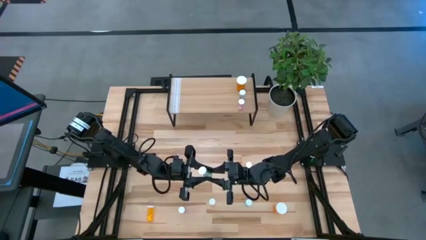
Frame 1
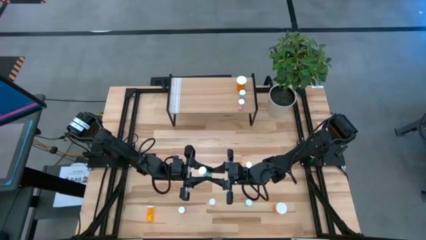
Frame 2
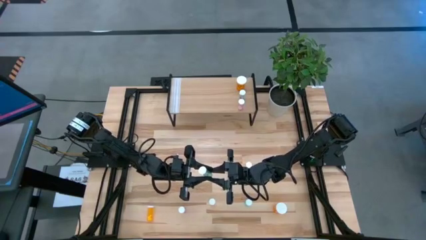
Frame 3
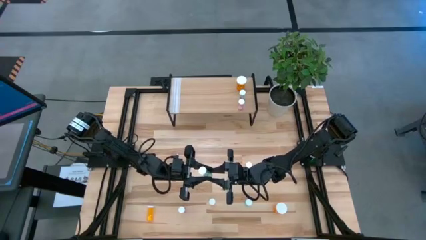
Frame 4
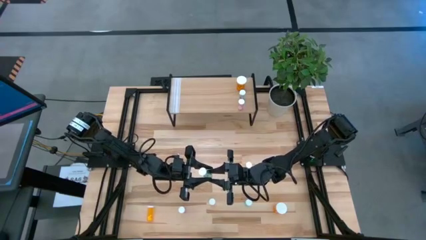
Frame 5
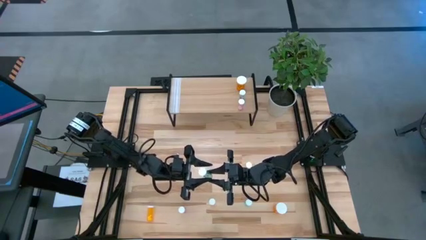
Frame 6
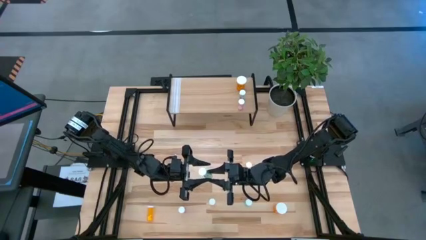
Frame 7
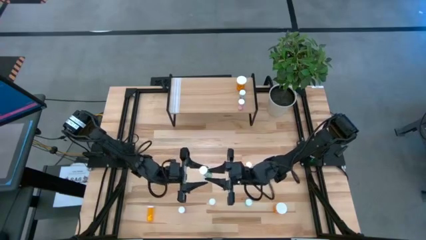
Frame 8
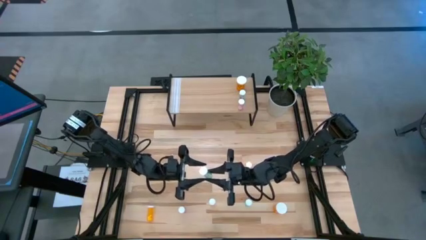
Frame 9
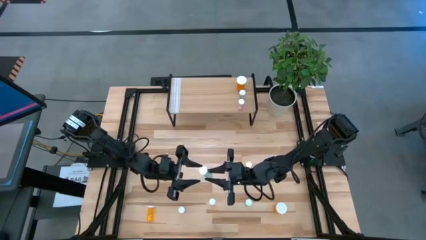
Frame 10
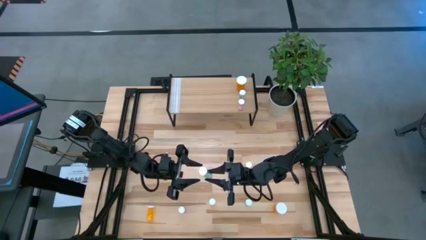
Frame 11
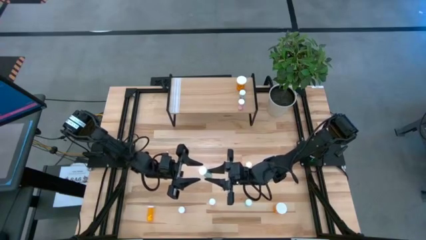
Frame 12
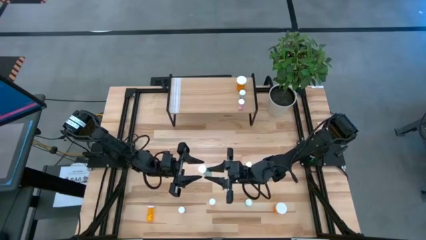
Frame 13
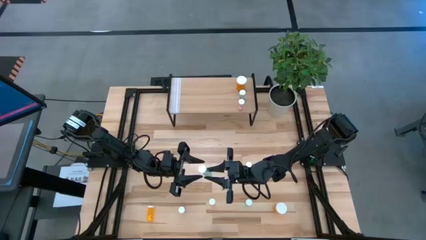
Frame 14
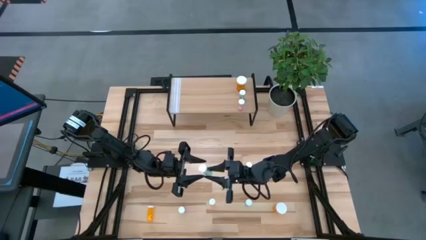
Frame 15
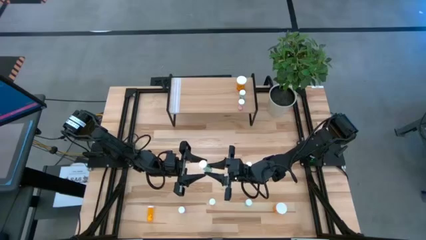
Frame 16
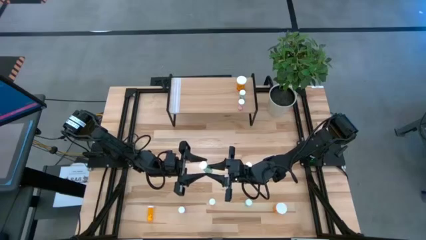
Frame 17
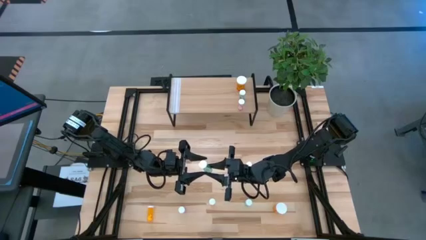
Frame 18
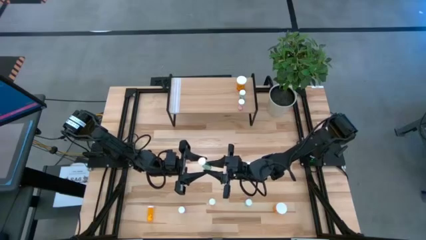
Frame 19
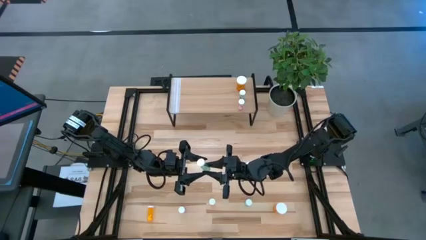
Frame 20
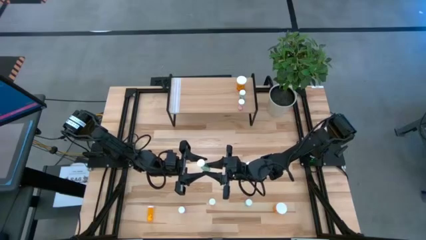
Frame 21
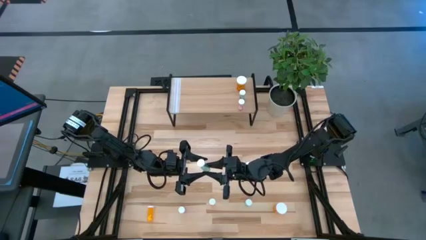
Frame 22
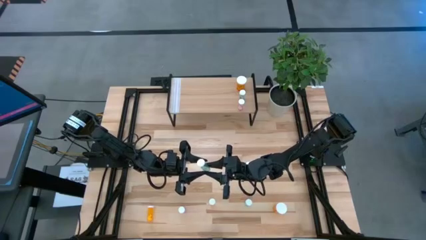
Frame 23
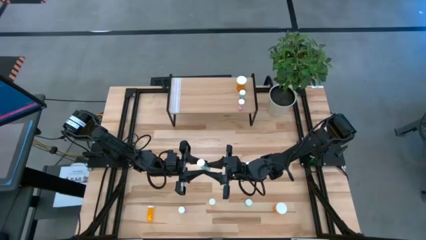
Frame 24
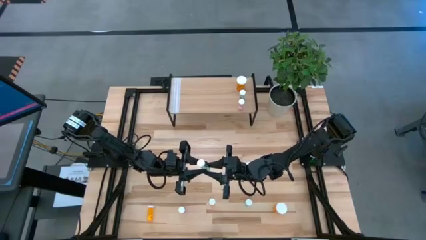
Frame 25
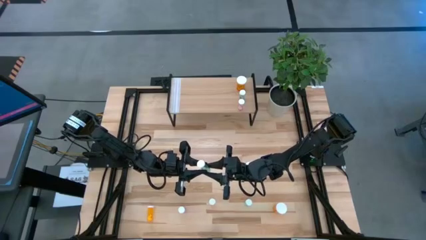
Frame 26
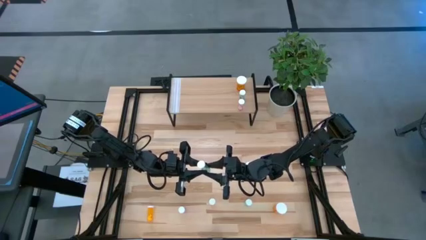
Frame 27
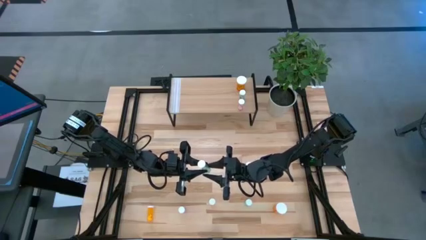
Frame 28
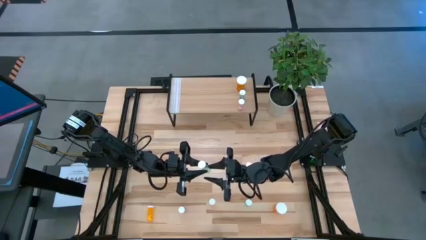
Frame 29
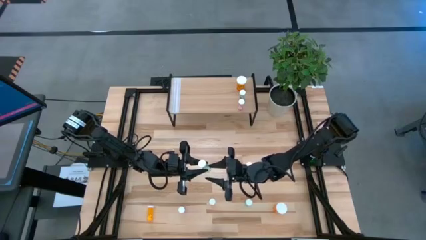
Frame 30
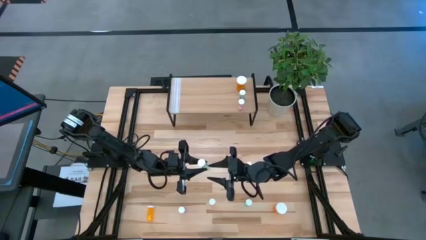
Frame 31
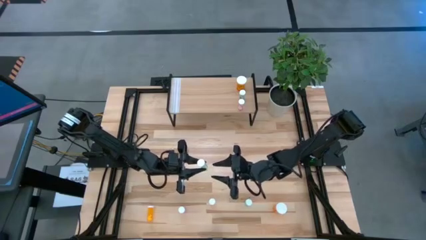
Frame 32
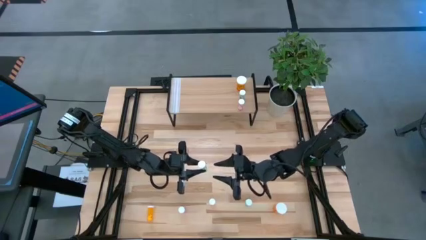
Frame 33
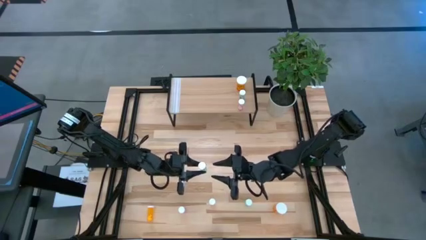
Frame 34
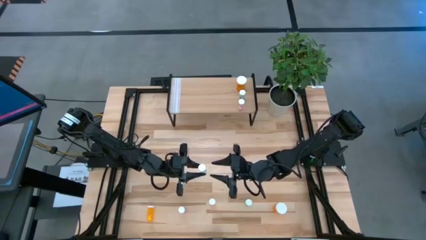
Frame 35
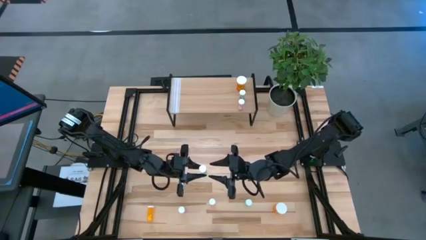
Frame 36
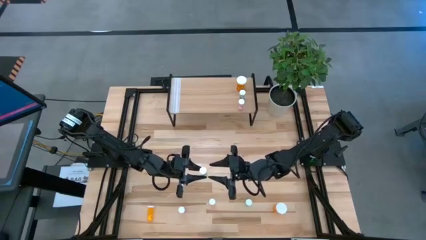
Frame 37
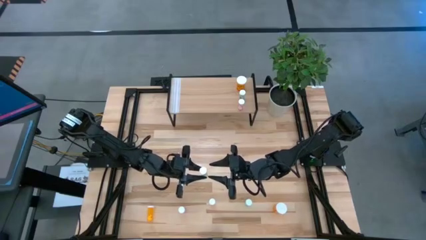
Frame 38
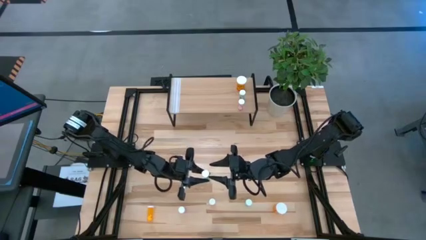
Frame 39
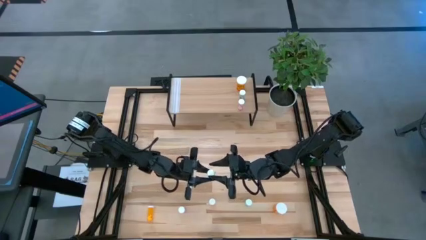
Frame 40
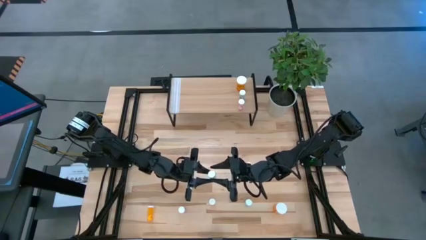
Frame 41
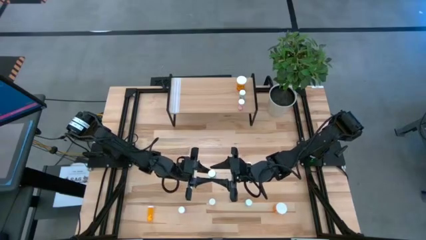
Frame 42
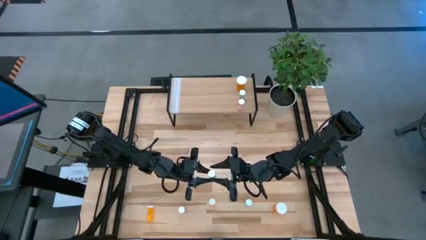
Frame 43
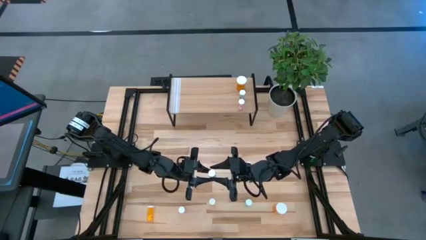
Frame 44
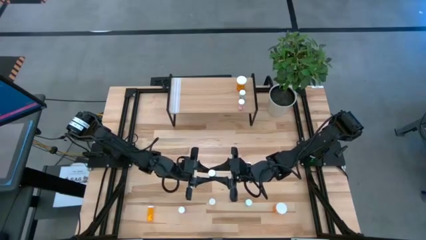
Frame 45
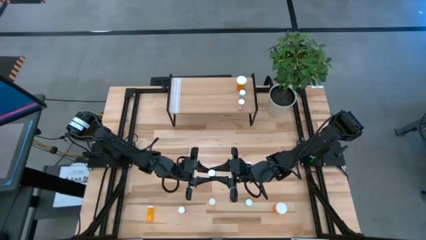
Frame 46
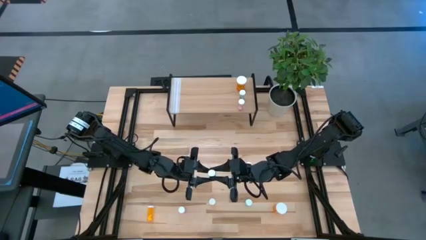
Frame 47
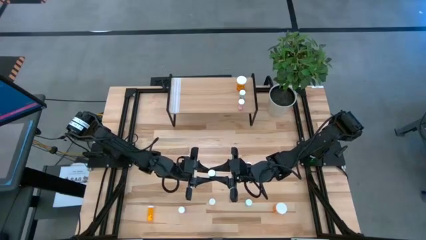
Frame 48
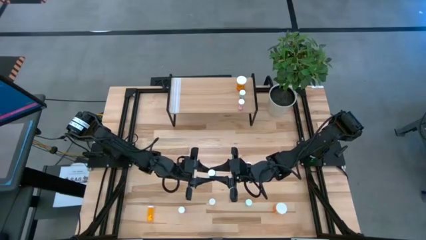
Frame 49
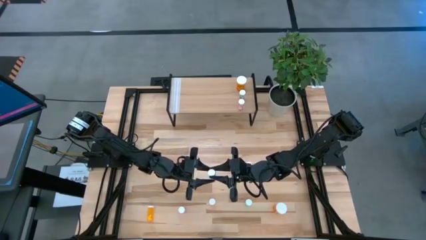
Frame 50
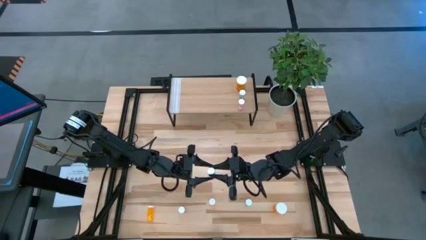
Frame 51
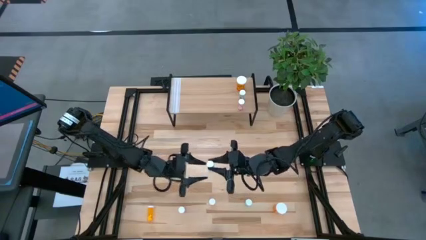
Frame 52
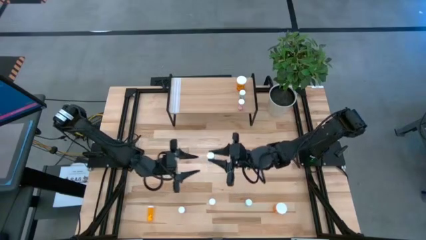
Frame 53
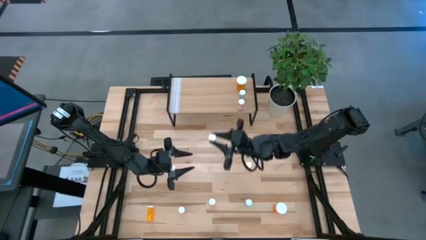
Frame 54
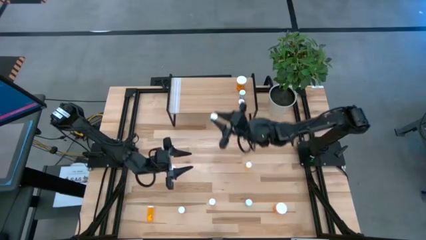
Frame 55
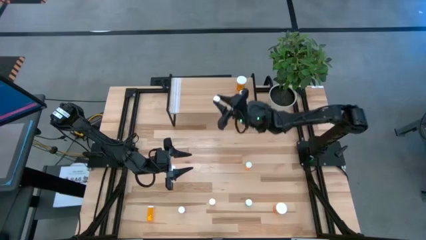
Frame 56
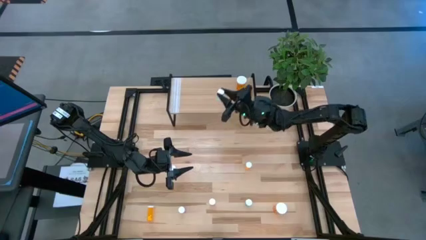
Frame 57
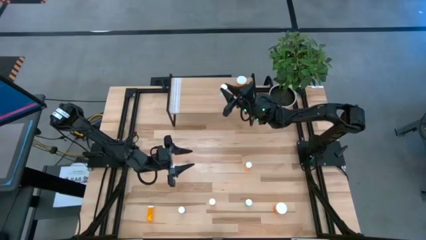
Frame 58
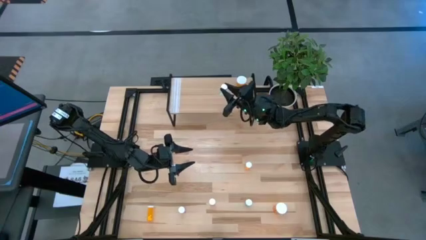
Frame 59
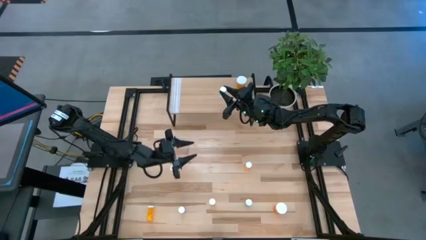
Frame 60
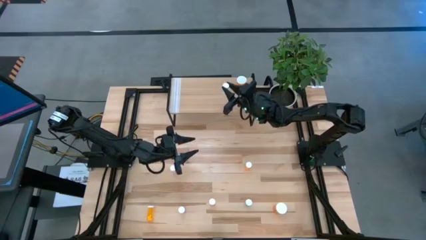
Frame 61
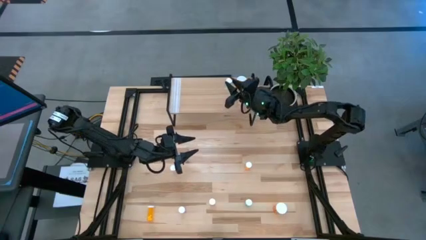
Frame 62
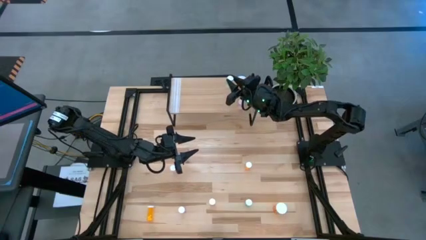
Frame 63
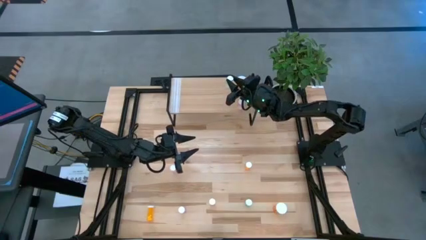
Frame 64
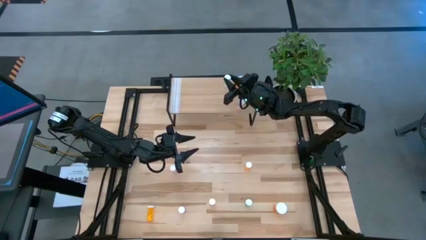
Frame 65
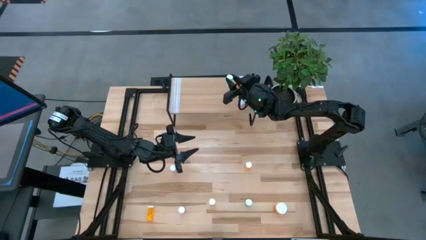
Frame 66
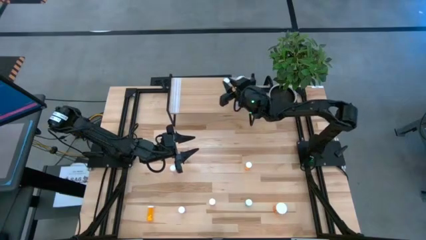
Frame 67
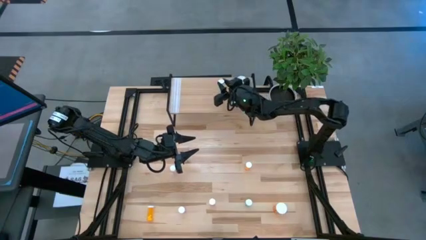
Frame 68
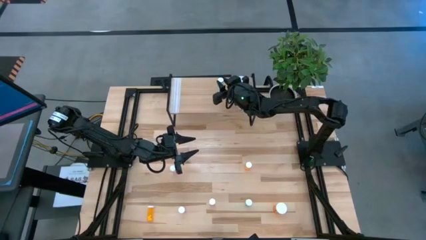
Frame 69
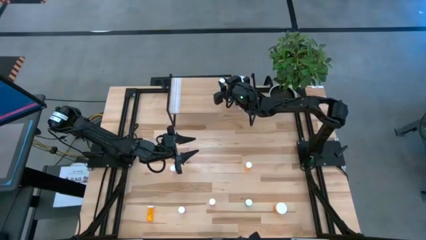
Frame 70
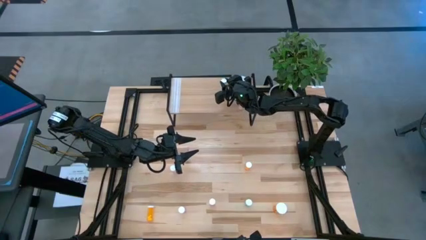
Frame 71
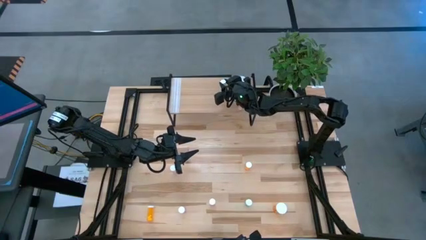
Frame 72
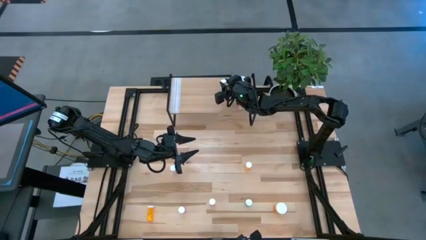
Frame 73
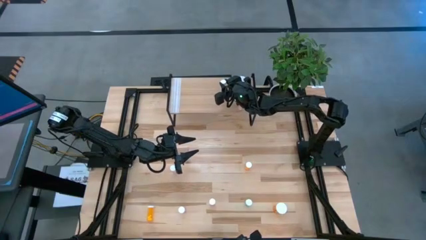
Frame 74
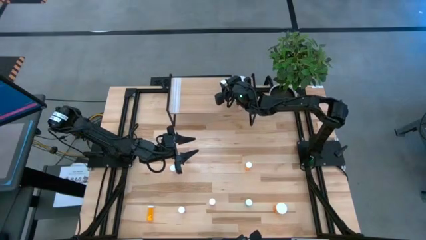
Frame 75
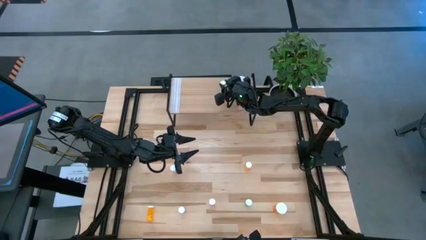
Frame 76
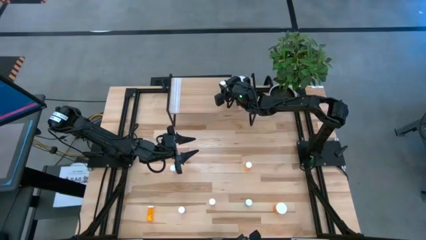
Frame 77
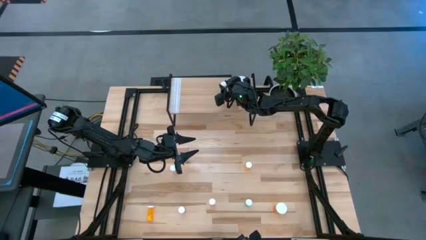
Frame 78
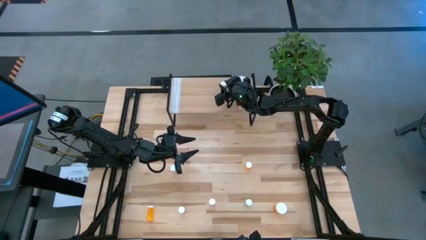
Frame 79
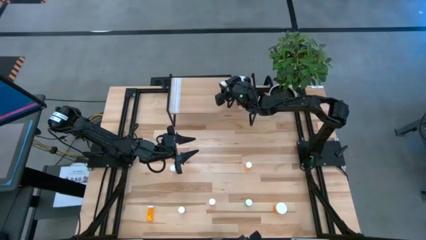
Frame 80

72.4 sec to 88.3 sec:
Task: Pick and place medicine bottles onto shelf by color
Put the top small blue pill bottle on the shelf
